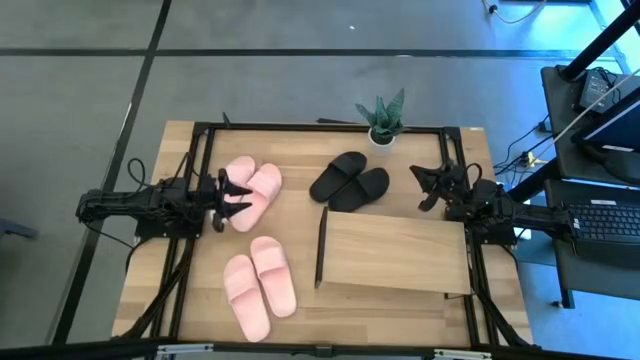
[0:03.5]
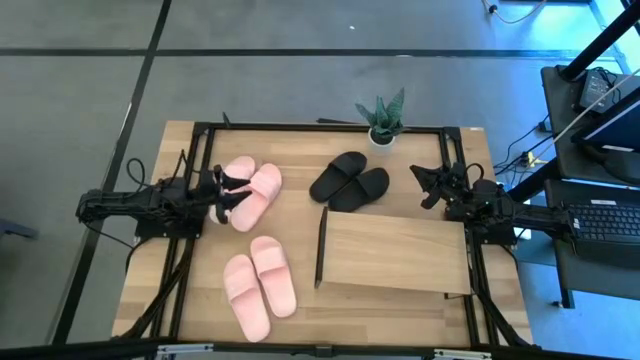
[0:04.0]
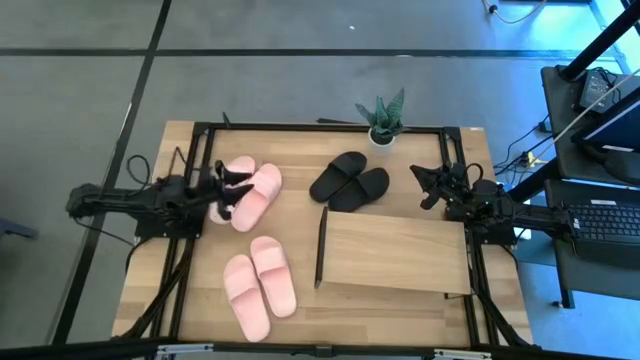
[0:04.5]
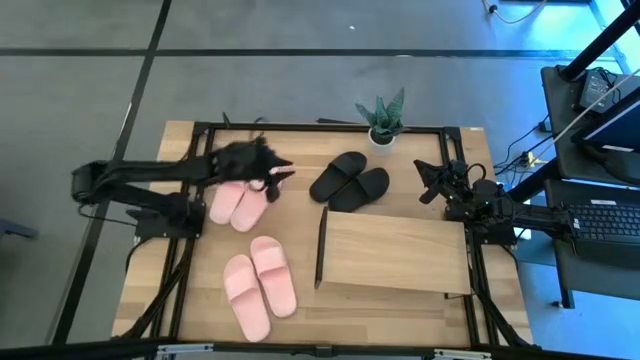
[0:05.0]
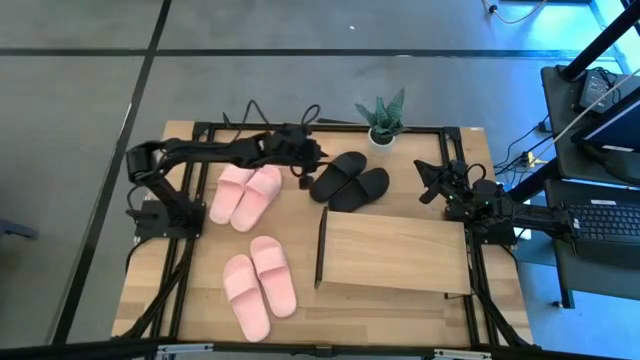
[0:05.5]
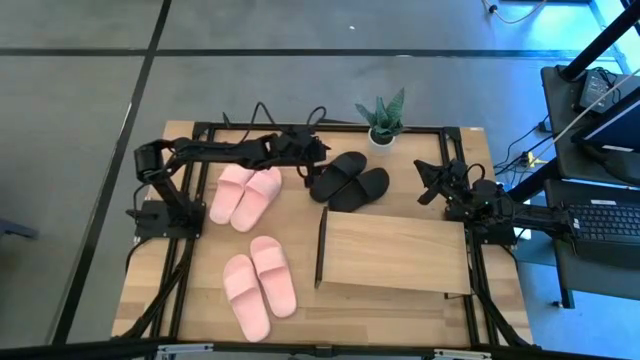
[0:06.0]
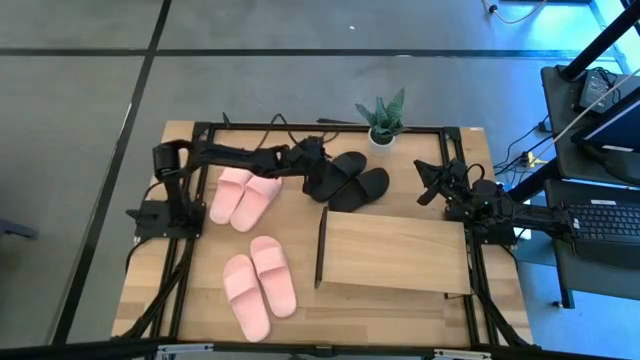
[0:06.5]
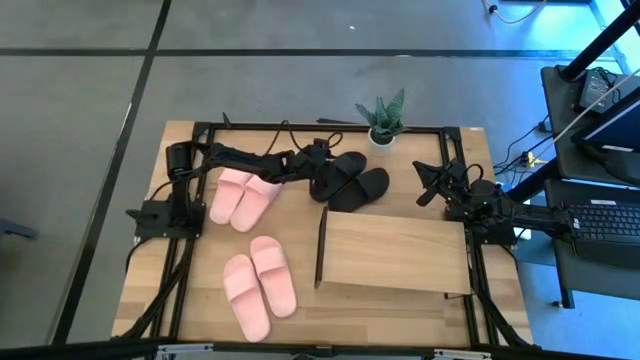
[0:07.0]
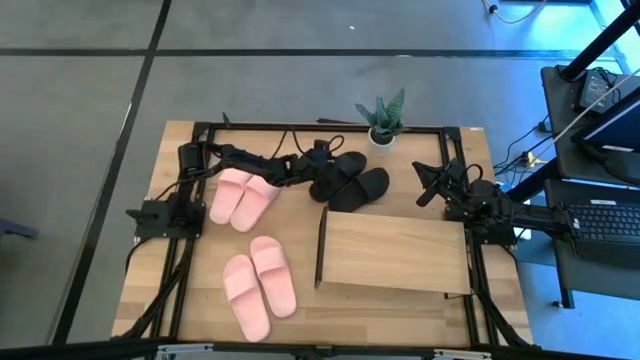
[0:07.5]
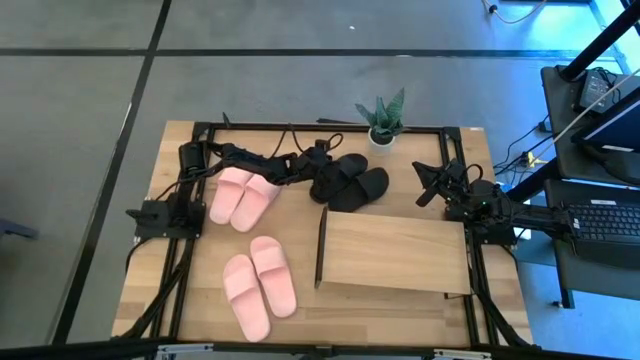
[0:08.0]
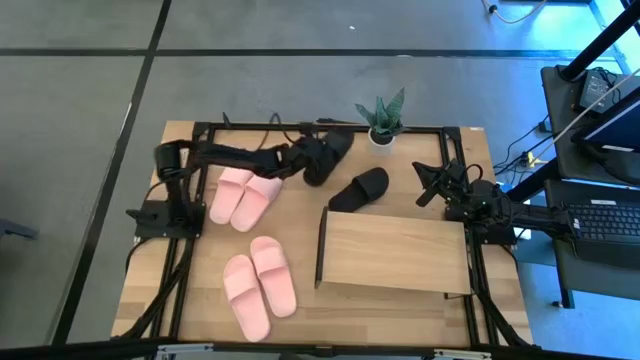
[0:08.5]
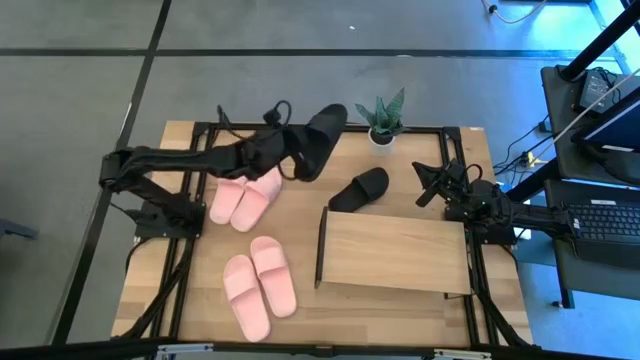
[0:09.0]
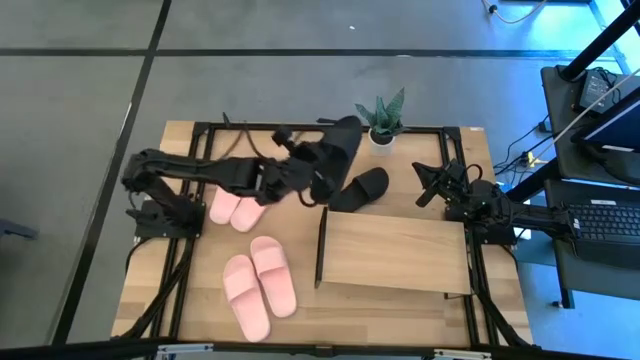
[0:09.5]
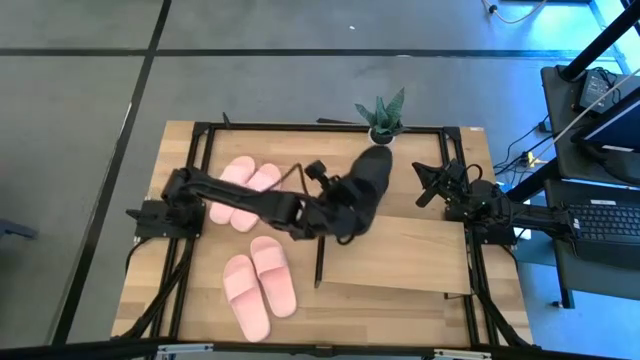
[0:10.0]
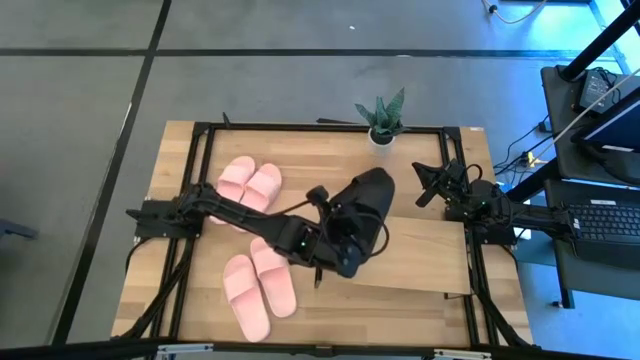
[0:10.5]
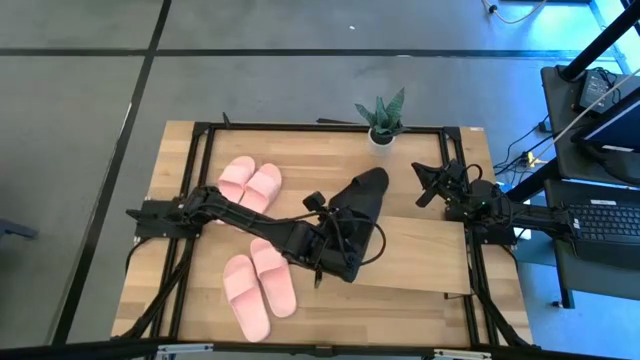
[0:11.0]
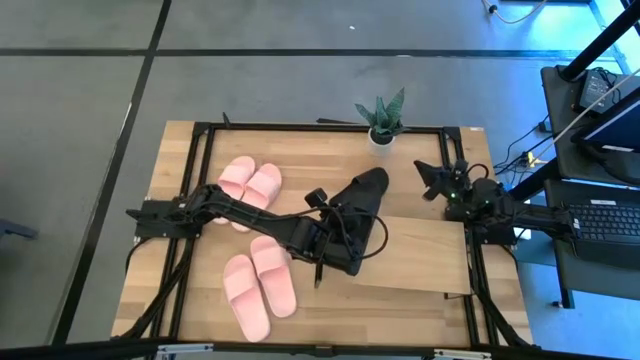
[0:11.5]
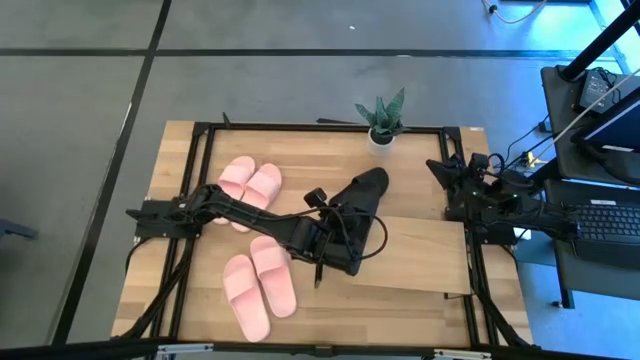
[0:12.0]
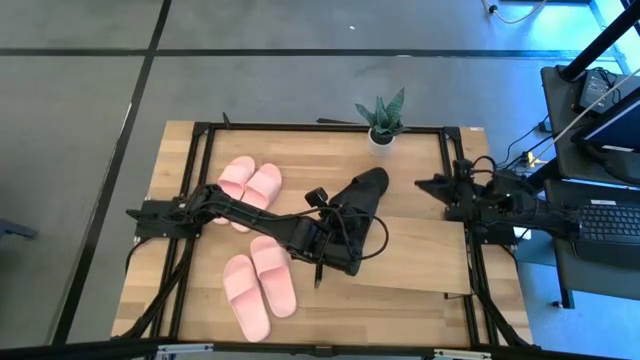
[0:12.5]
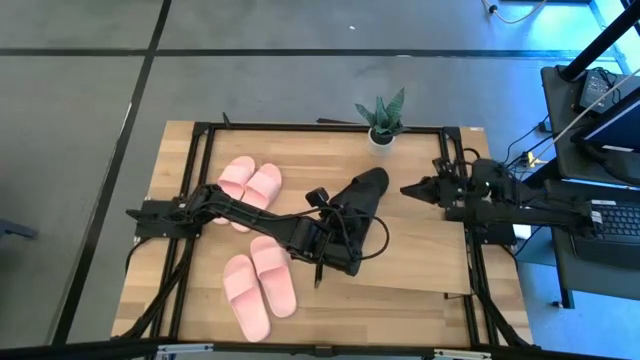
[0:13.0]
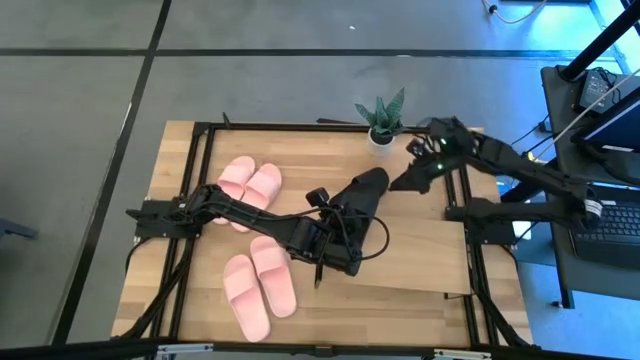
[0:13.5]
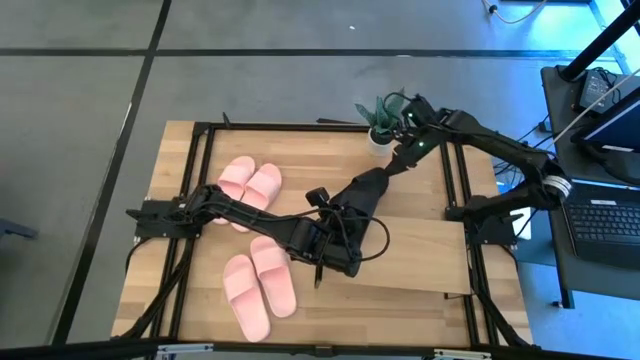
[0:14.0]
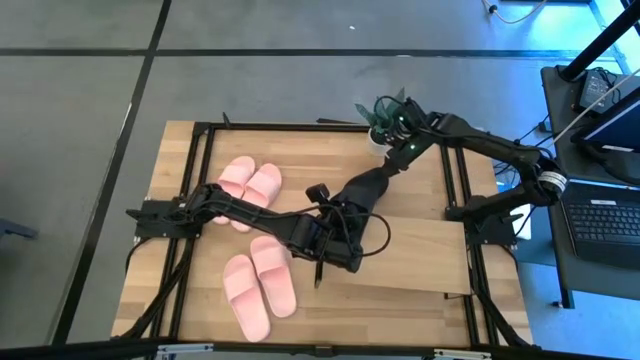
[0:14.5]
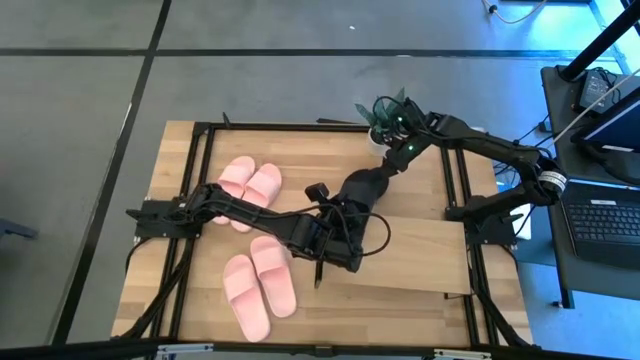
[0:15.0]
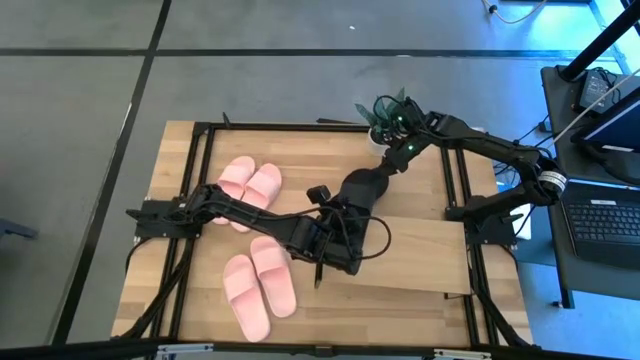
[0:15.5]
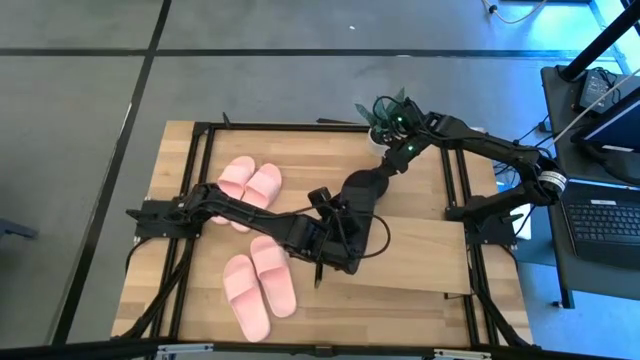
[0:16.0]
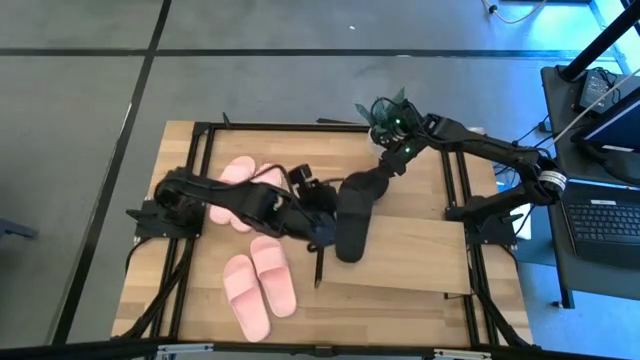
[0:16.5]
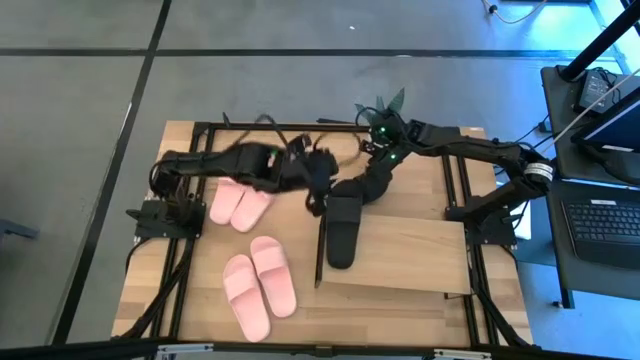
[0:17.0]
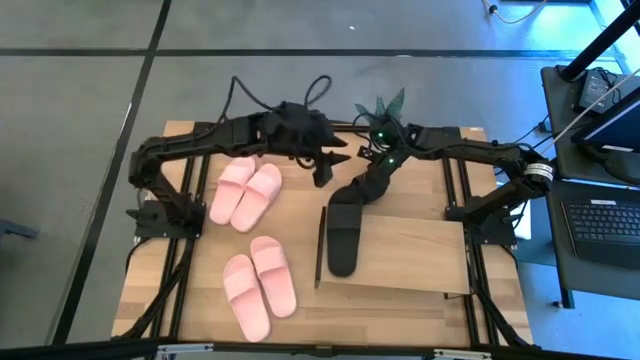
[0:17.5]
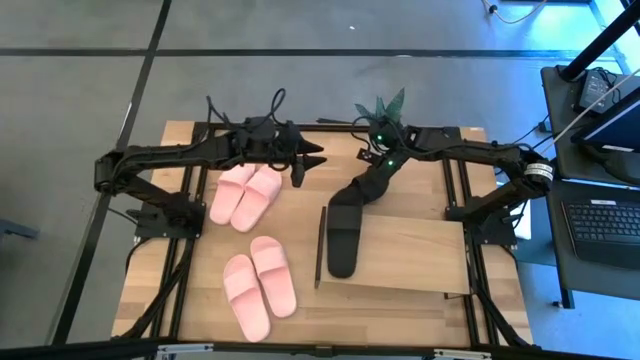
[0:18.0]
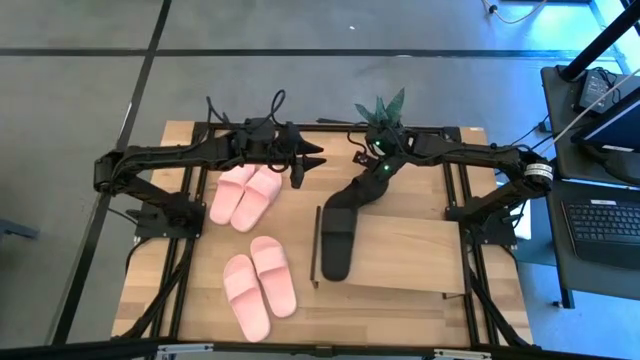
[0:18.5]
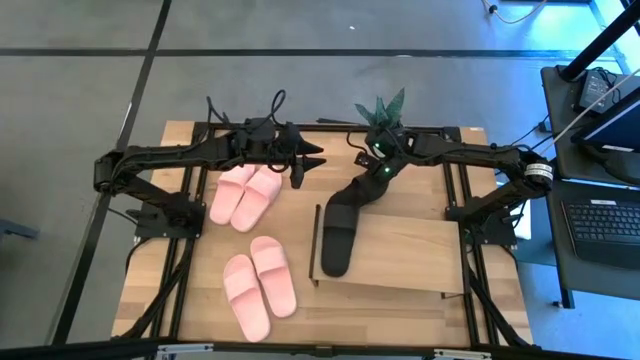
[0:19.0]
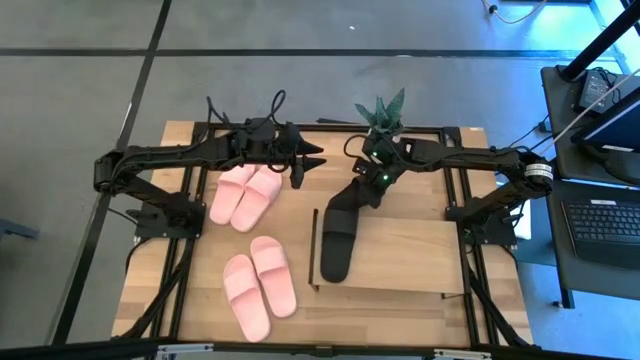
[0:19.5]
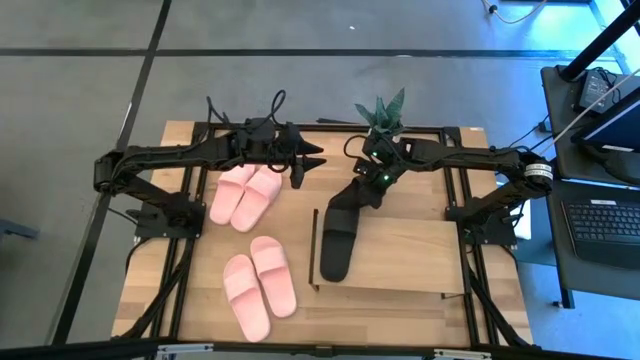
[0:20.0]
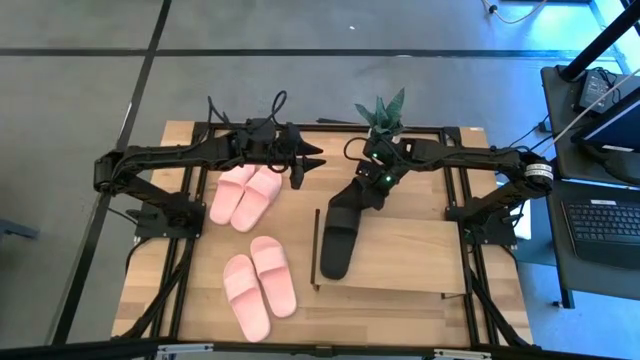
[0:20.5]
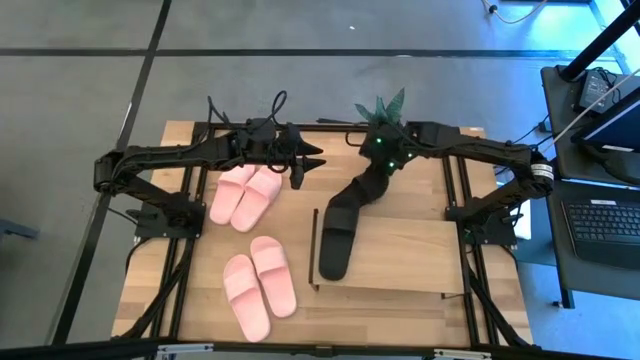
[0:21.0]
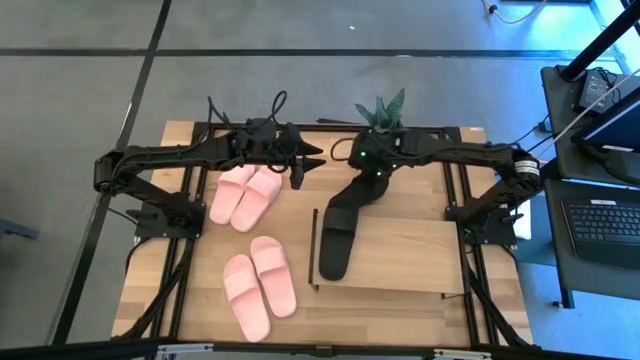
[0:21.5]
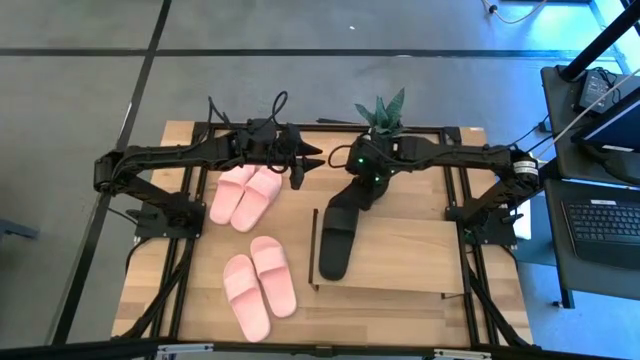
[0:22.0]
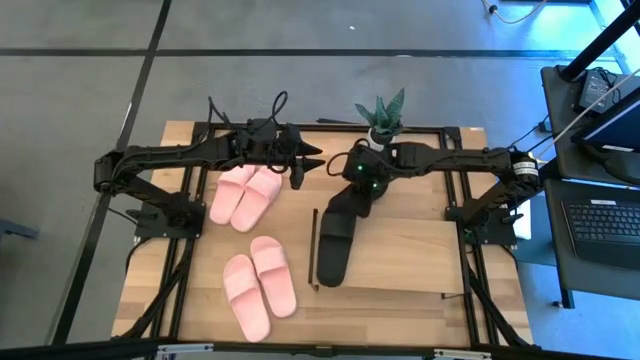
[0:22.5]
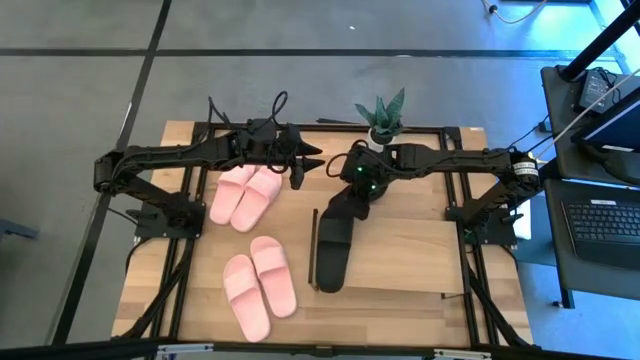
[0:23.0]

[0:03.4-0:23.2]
Task: Pick and place slides into the shelf
Put the left black slipper onto the shelf
